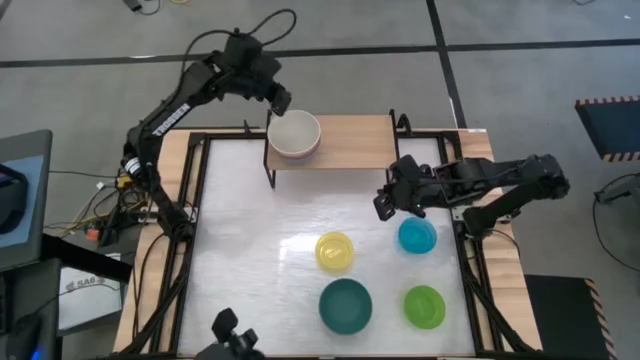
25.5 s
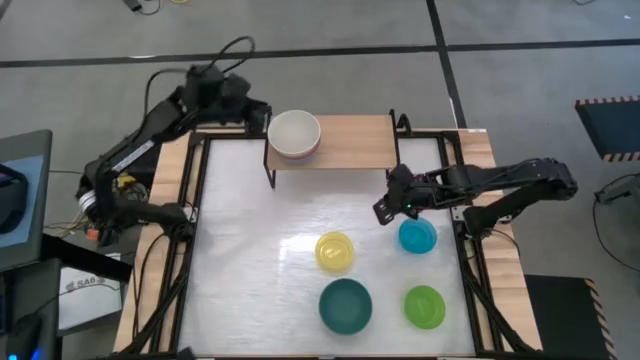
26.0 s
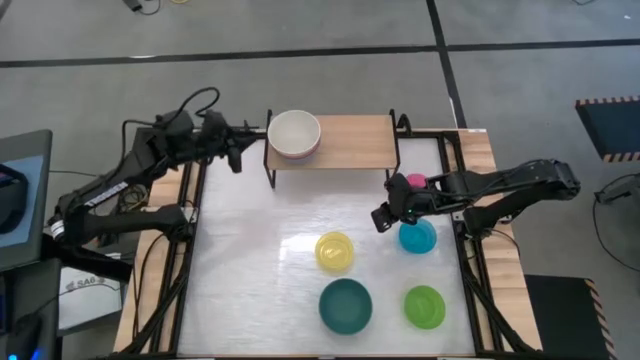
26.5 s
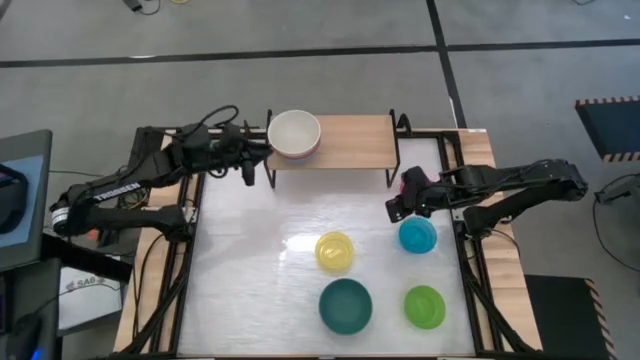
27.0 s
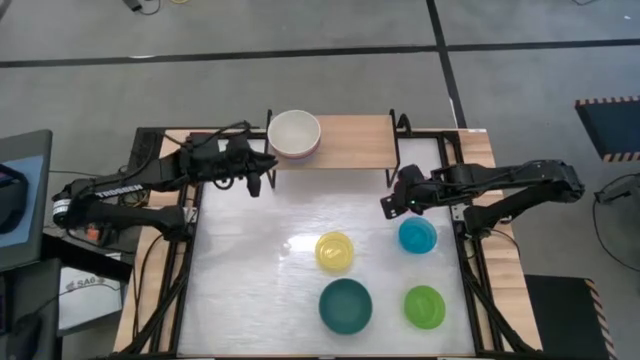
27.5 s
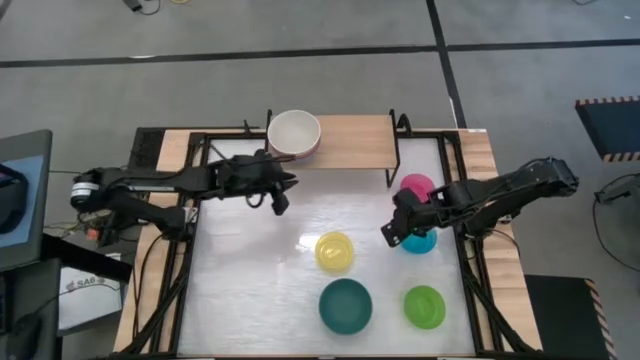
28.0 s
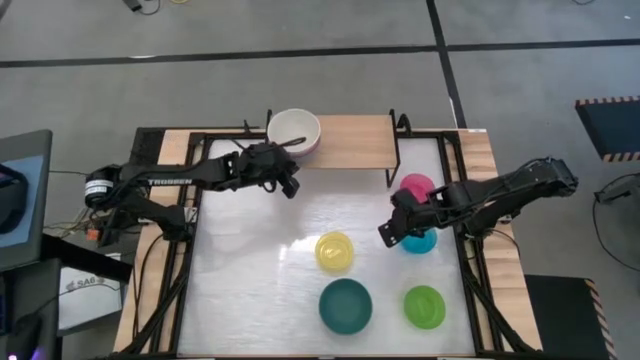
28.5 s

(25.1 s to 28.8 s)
Task: Place and stack bowls onto a shelf
Adjust the stacked bowls on the shelf

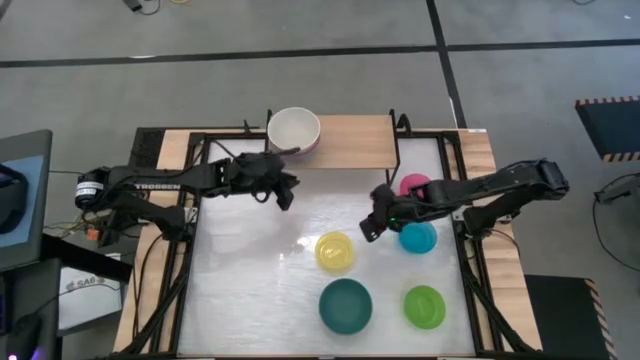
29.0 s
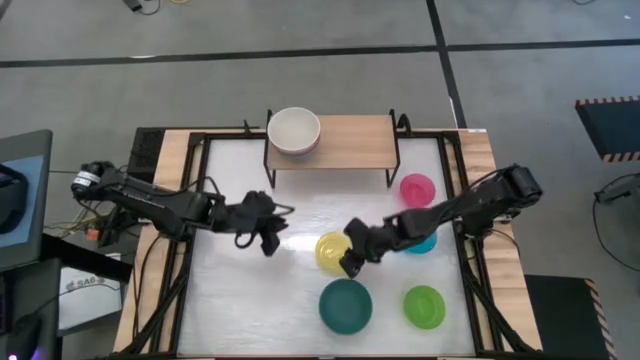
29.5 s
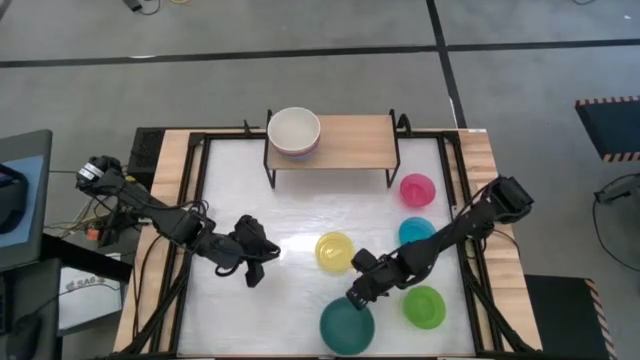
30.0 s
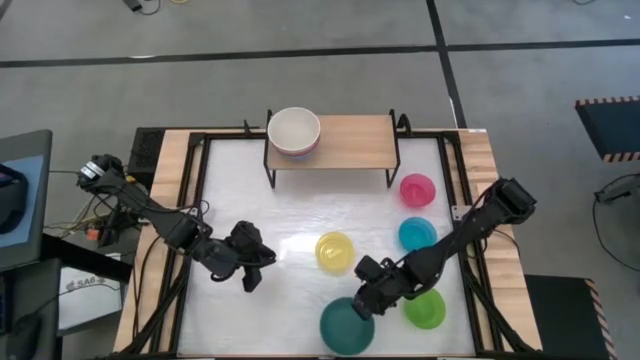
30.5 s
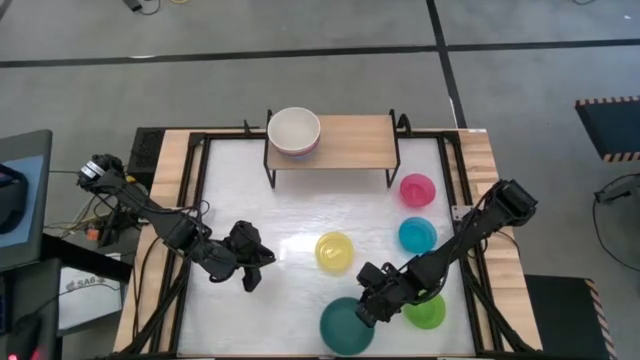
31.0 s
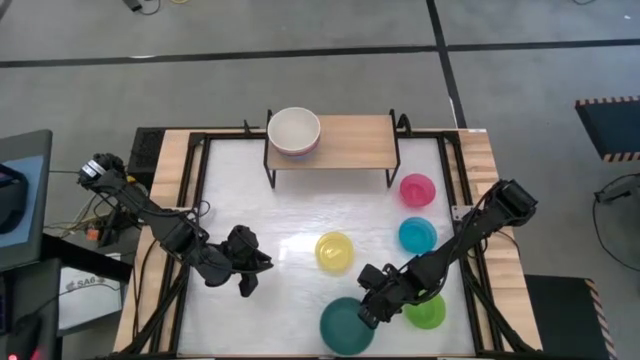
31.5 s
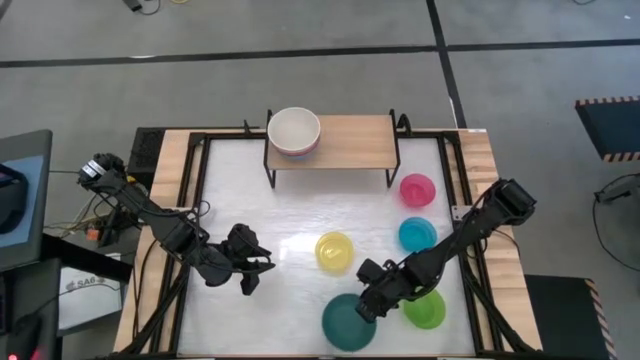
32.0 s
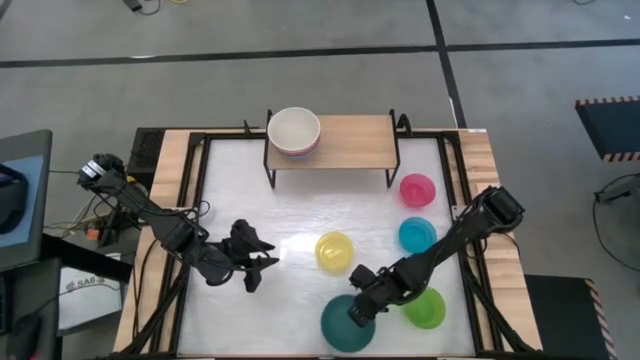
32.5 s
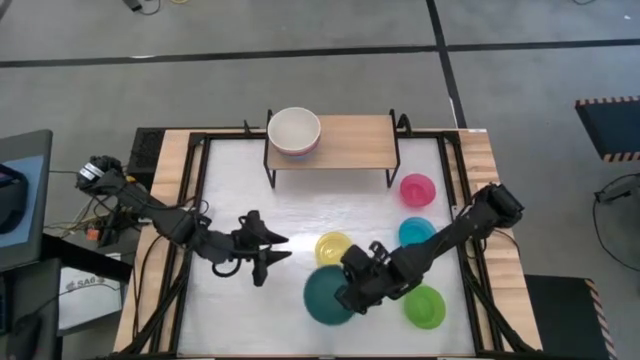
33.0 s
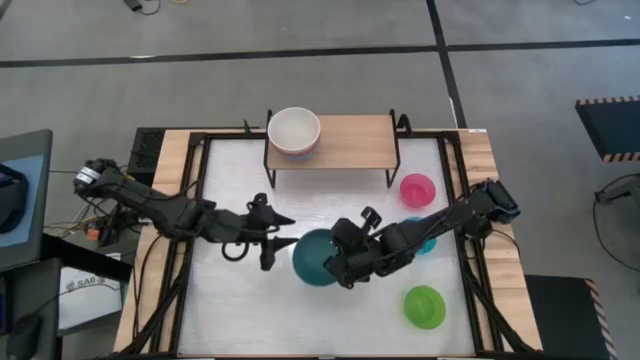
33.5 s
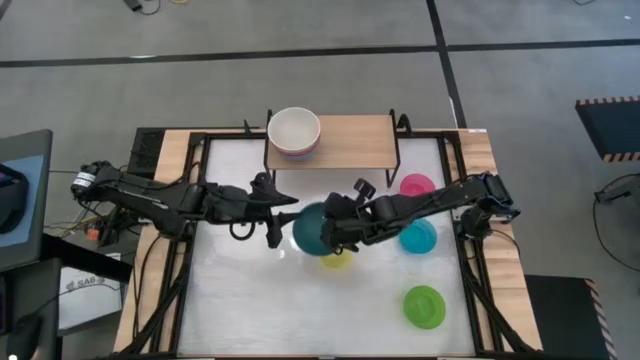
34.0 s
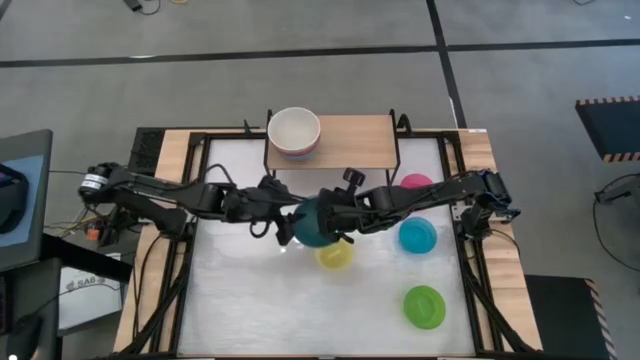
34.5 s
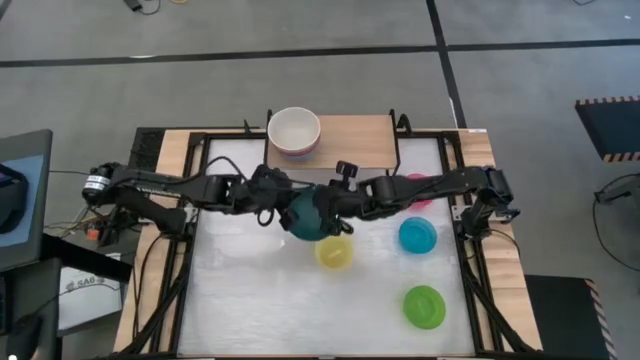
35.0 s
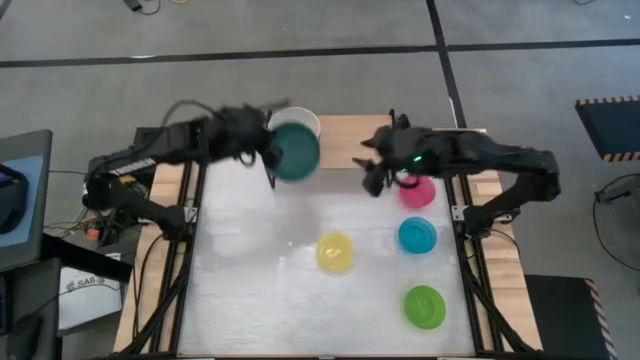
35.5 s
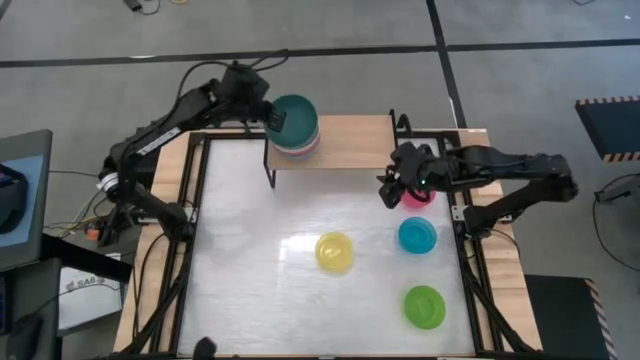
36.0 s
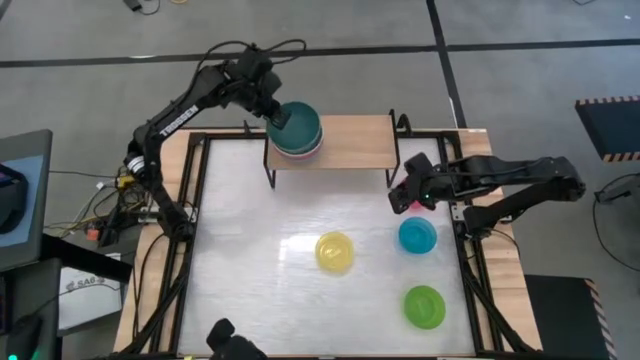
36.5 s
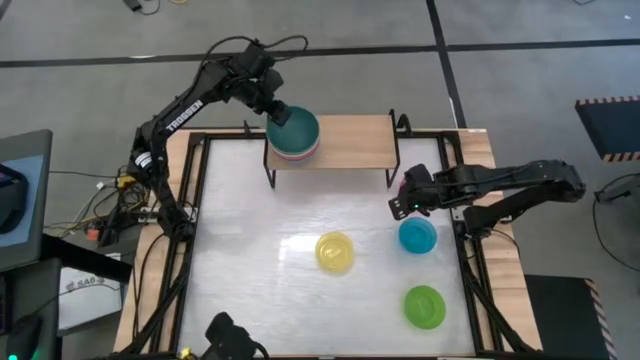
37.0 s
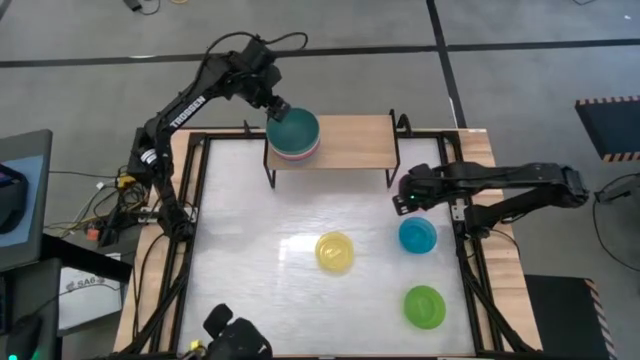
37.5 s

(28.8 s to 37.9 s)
Stack the dark green bowl on top of the white bowl on the shelf

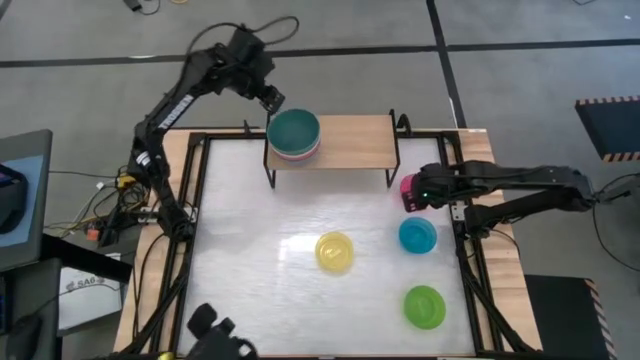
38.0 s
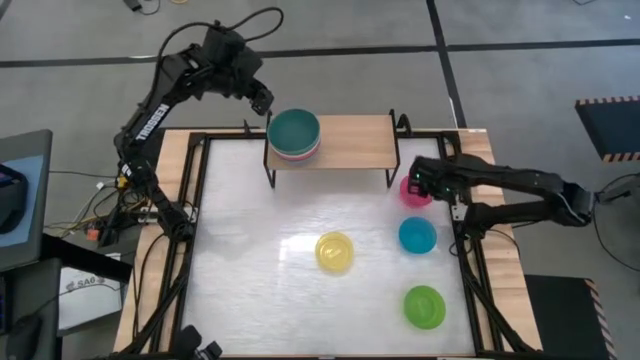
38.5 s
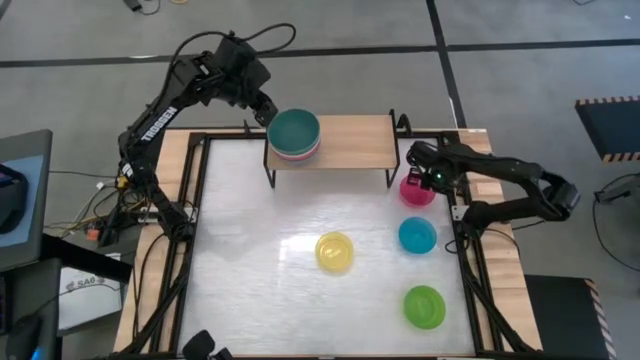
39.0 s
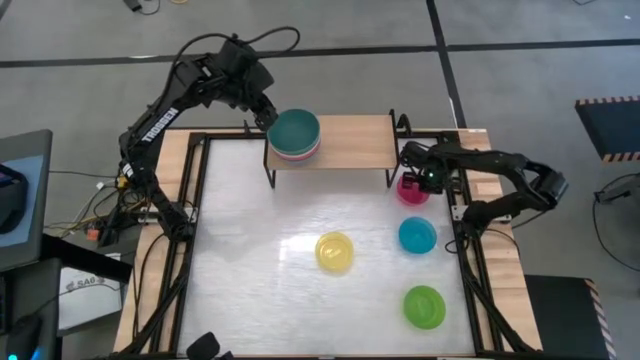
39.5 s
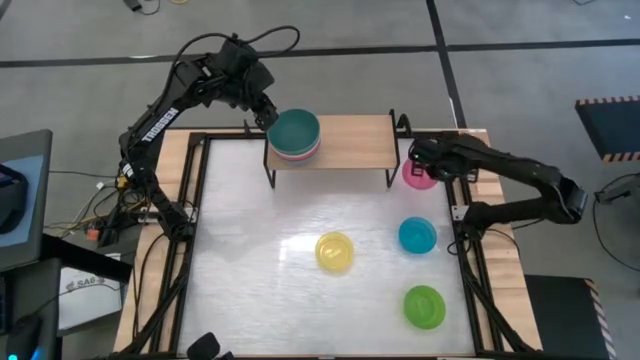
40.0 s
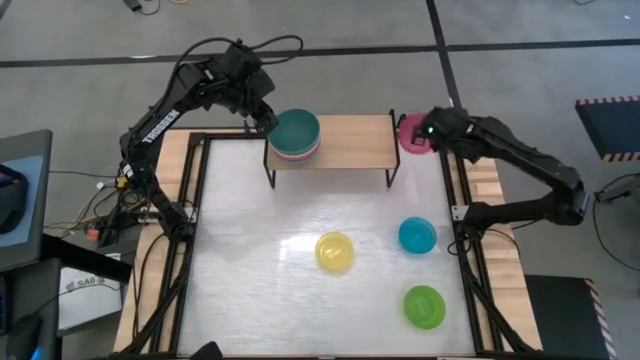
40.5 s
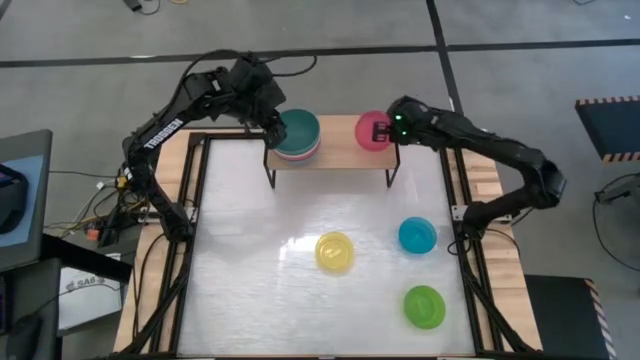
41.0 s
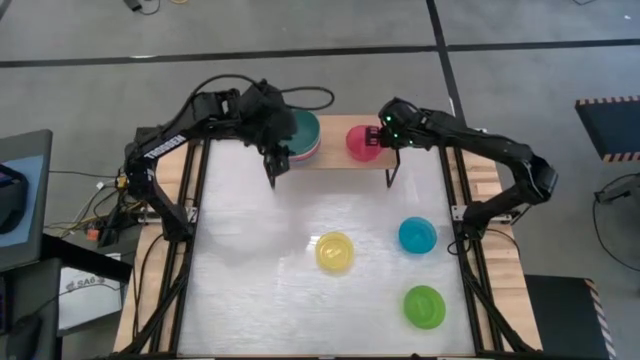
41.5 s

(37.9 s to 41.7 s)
Put the red bowl on the shelf

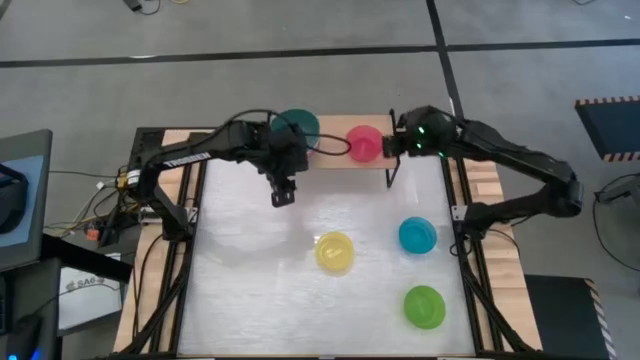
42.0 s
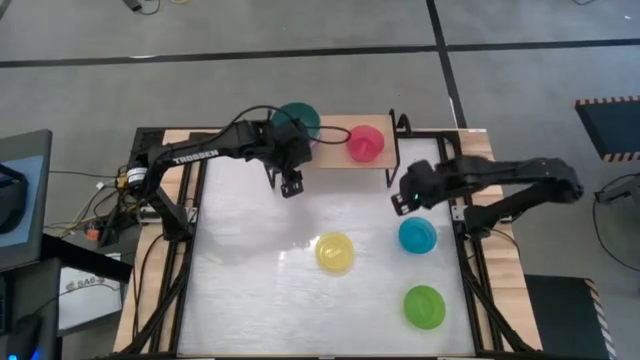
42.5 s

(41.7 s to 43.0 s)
Adjust the stacked bowls on the shelf

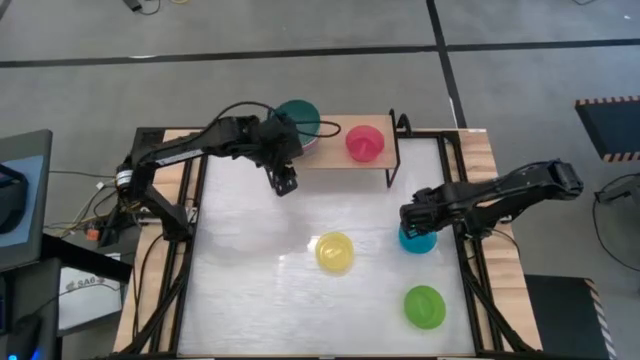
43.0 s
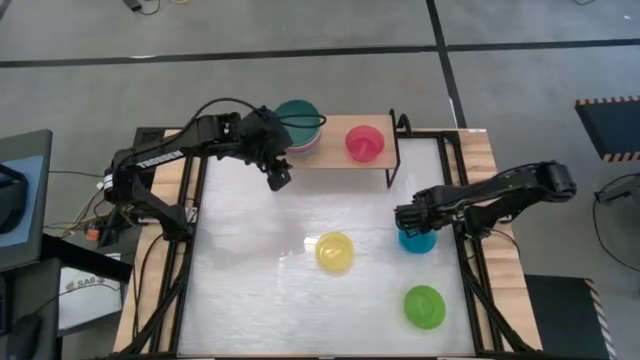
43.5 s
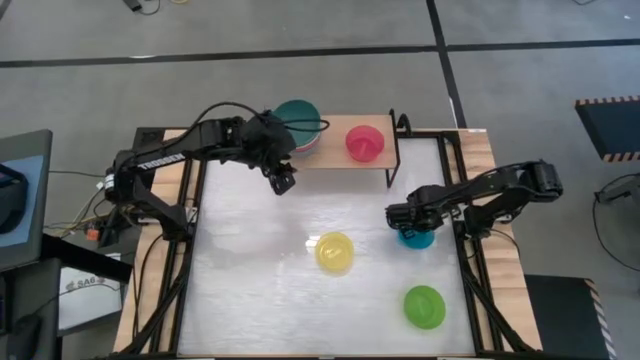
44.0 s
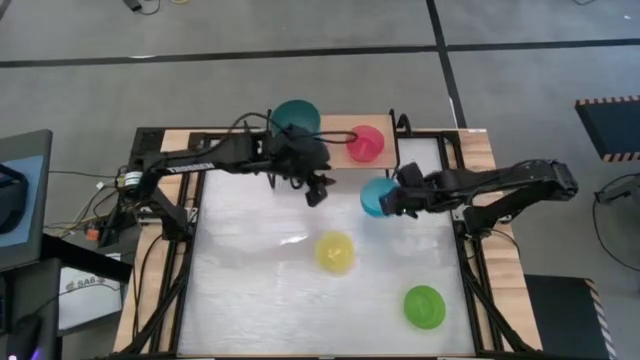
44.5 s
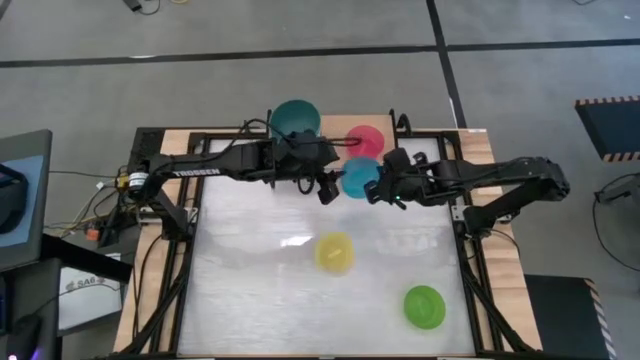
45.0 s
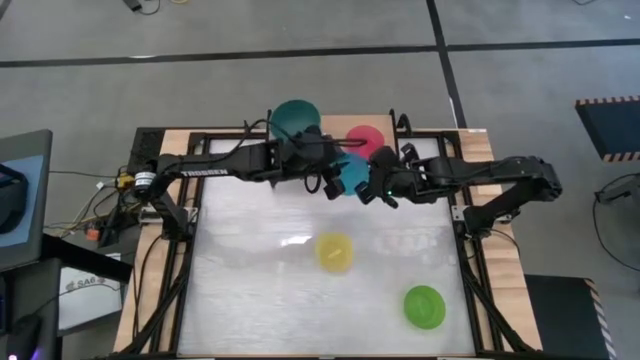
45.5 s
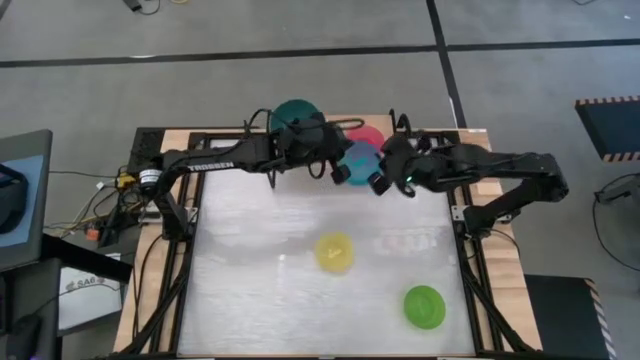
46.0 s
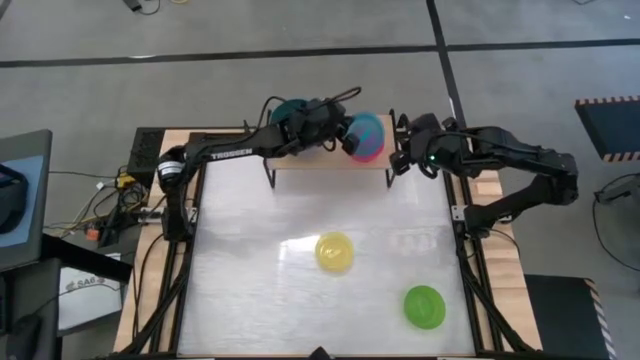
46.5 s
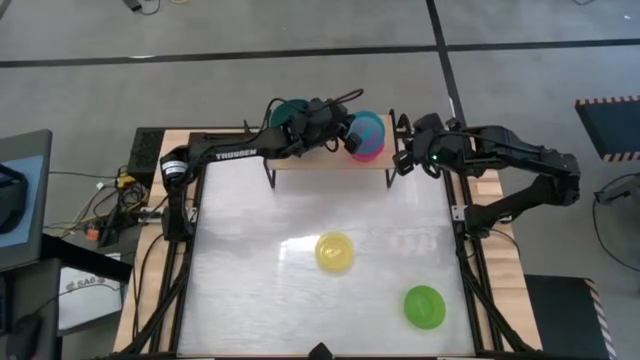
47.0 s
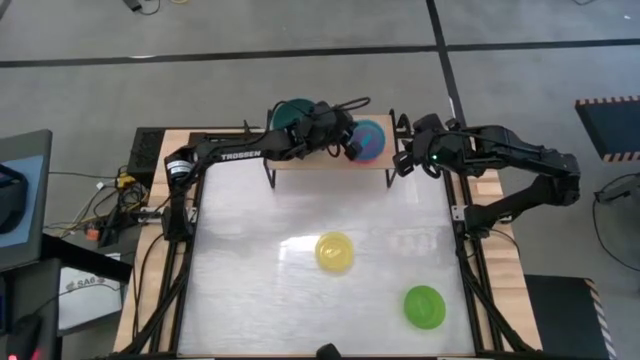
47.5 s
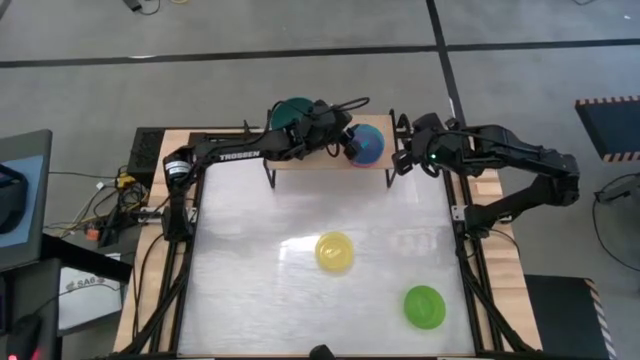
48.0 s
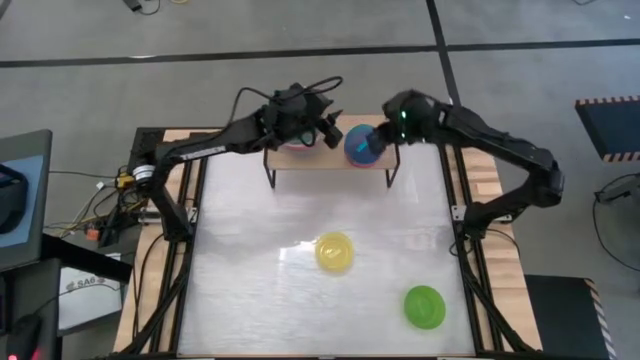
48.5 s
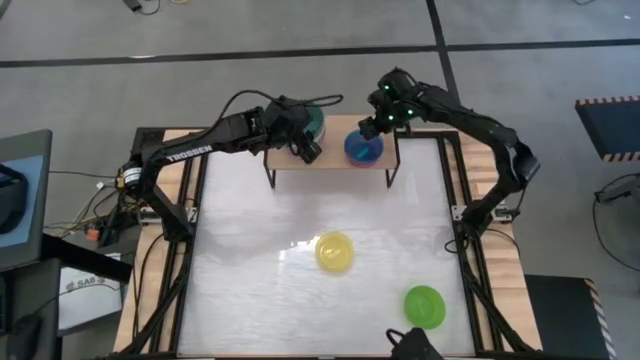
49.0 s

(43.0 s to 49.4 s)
Stack the light blue bowl on top of the red bowl on the shelf
